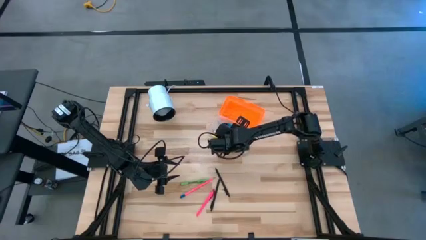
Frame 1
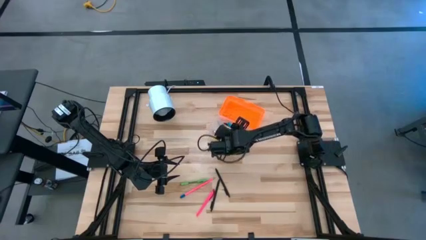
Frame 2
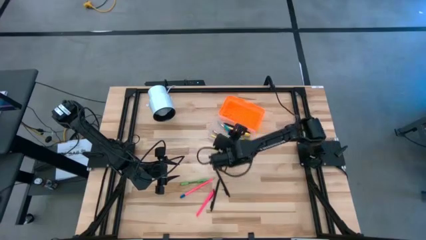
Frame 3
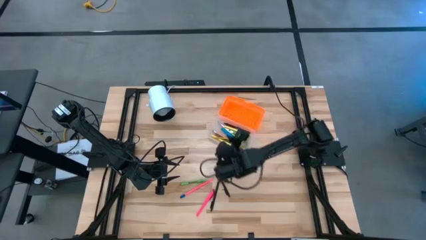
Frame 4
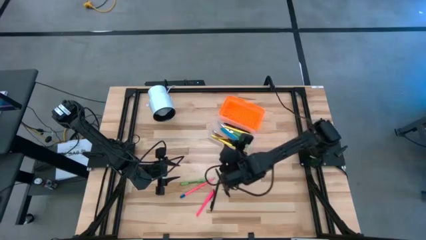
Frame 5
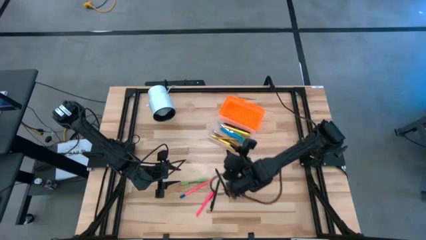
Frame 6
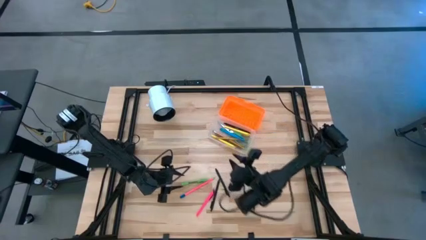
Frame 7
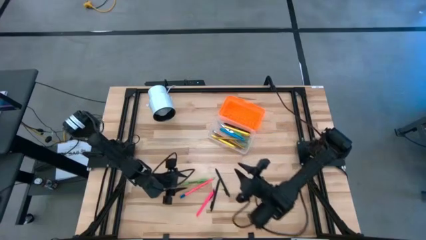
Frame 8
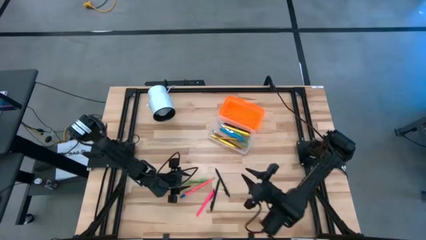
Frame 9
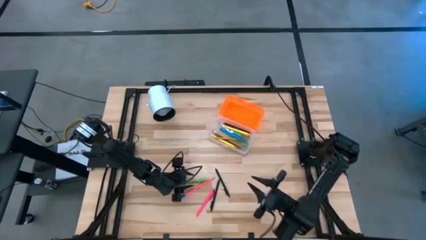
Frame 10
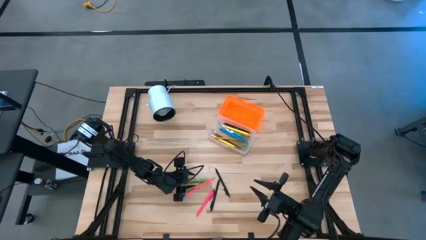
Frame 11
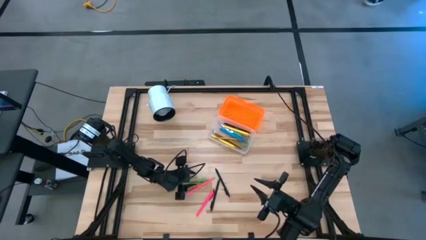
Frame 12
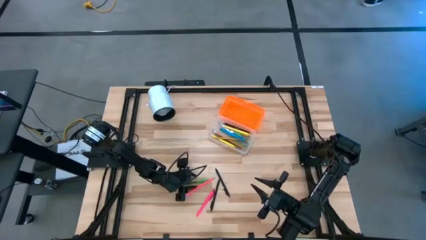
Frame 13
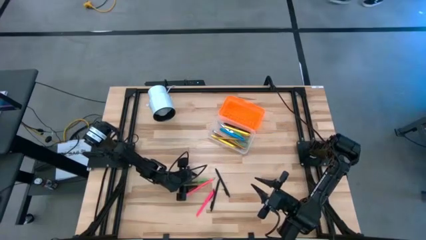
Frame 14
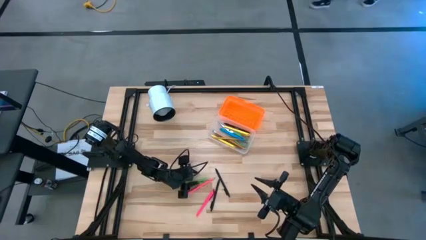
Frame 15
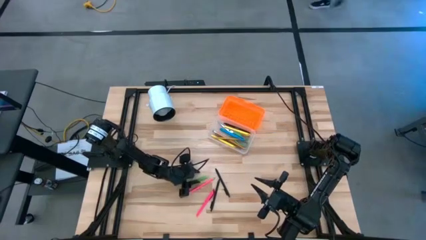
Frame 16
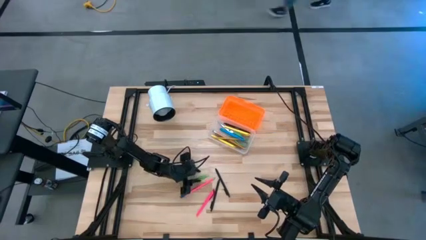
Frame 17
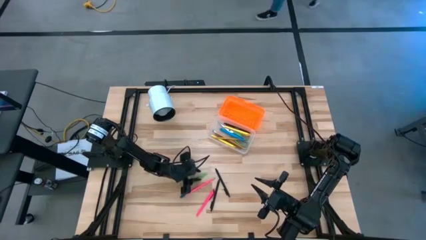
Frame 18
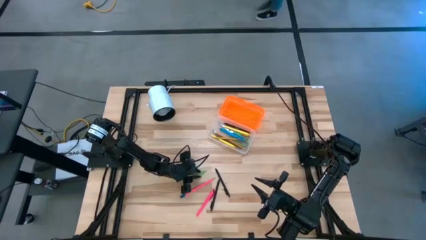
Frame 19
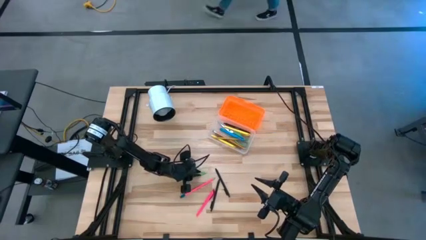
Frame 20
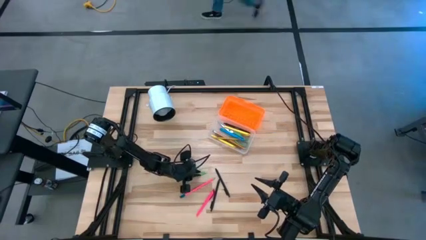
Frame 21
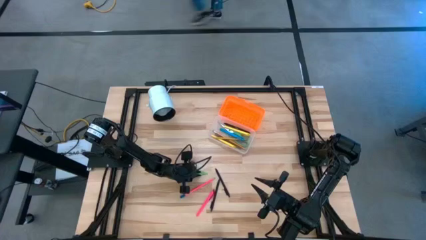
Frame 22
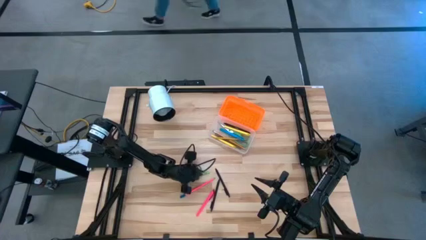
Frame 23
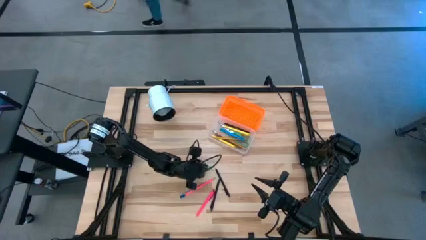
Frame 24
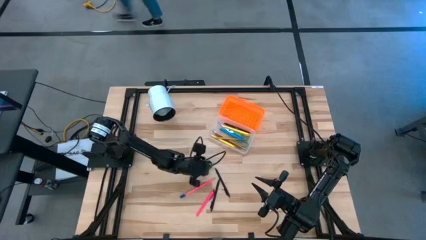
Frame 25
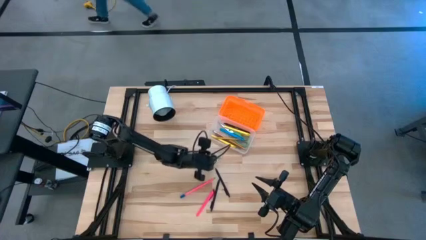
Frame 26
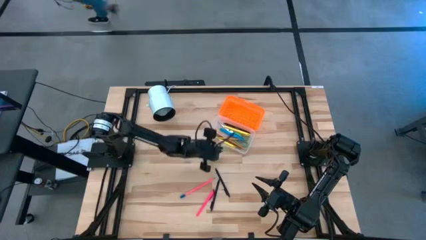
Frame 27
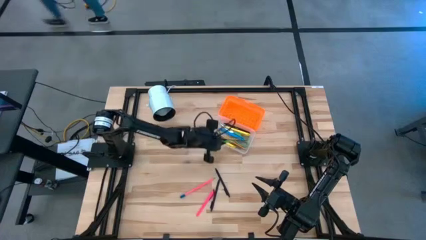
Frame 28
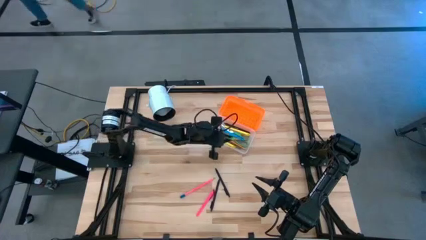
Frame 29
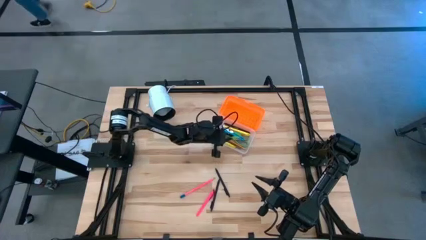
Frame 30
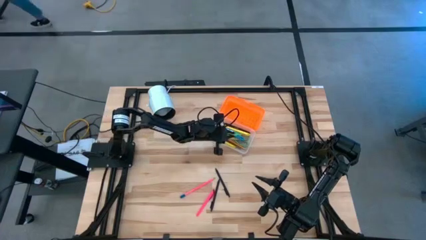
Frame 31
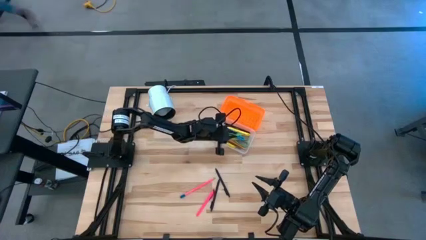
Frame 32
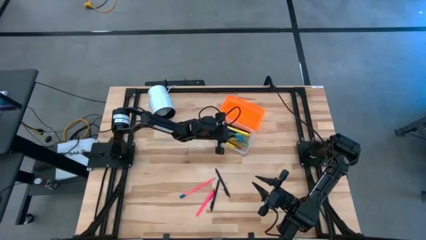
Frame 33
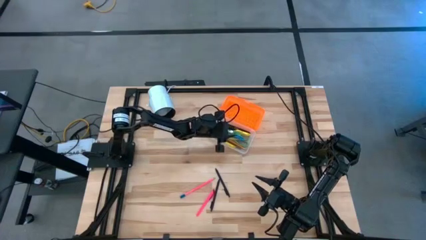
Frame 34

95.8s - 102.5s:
Task: Pick & place school supplies into a supply box
Put the green pen into the supply box

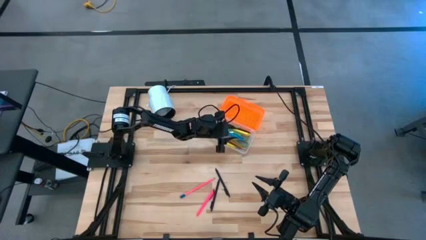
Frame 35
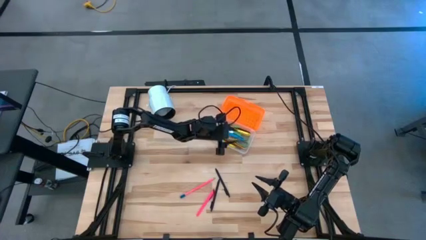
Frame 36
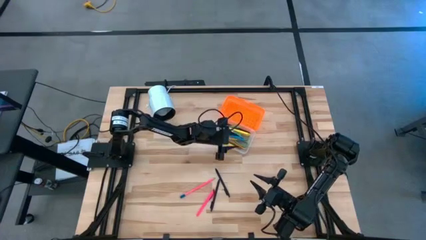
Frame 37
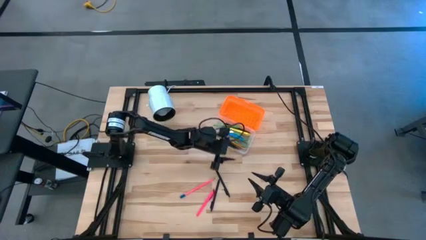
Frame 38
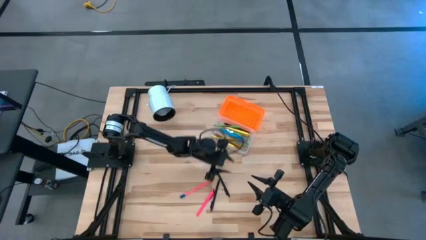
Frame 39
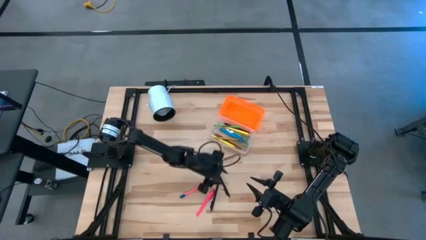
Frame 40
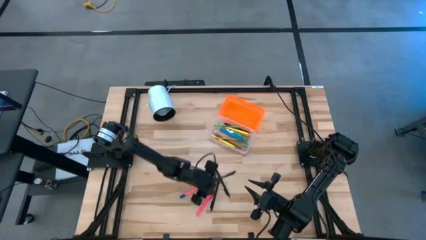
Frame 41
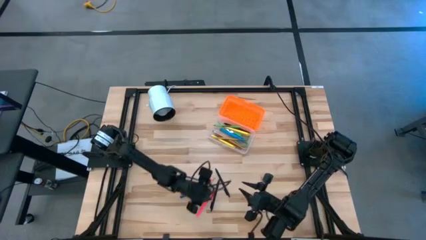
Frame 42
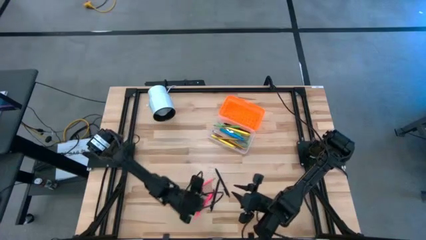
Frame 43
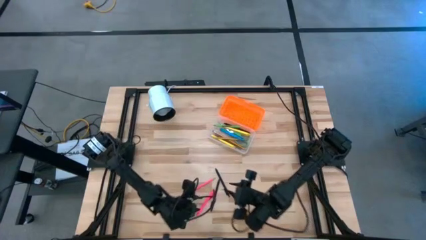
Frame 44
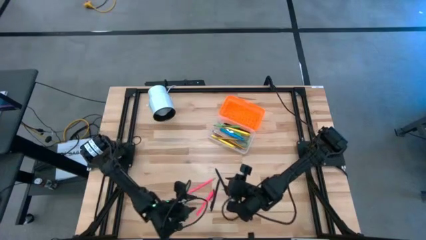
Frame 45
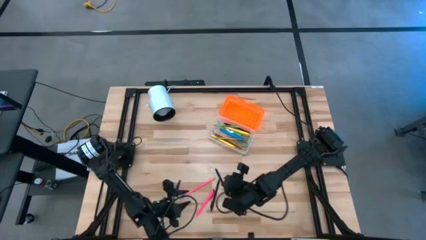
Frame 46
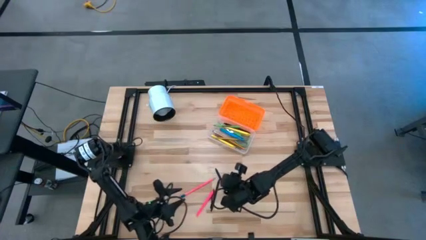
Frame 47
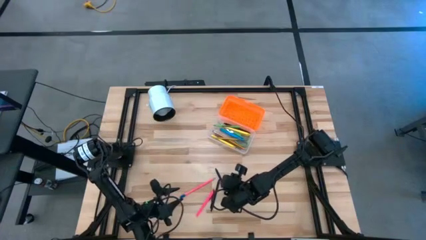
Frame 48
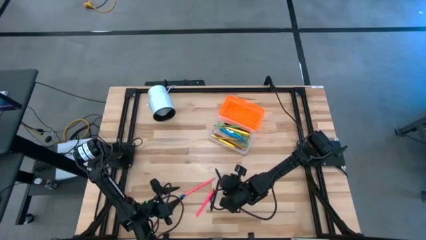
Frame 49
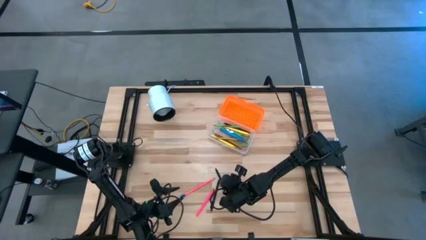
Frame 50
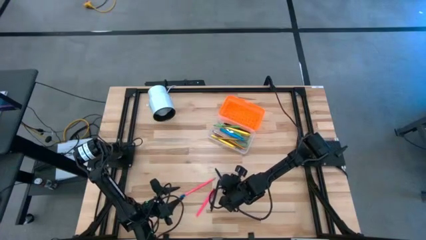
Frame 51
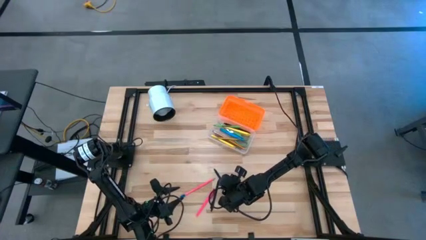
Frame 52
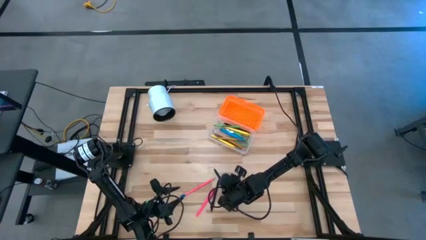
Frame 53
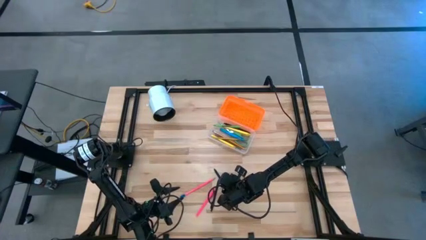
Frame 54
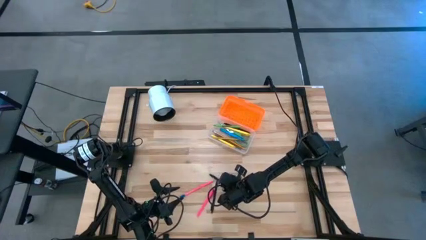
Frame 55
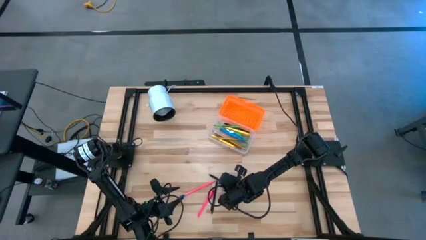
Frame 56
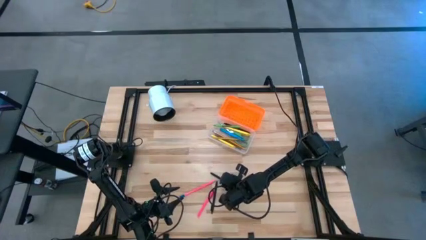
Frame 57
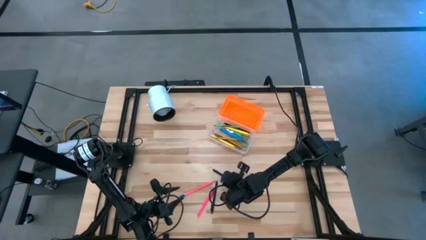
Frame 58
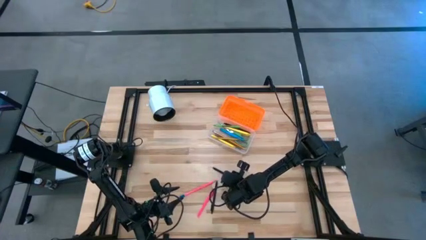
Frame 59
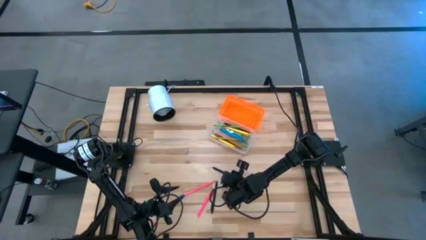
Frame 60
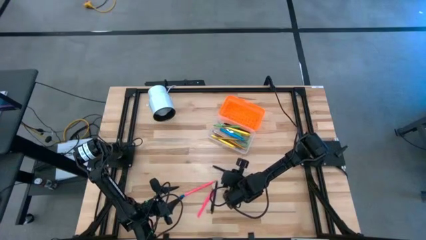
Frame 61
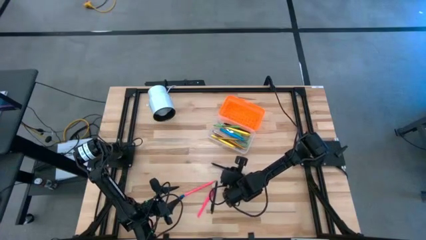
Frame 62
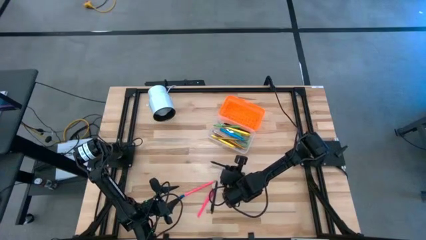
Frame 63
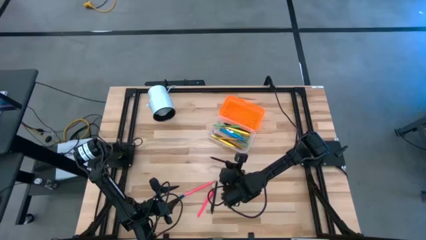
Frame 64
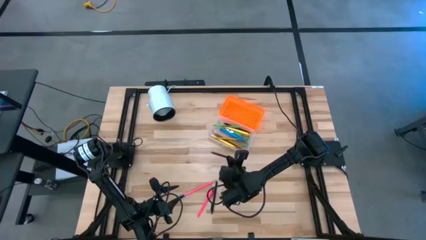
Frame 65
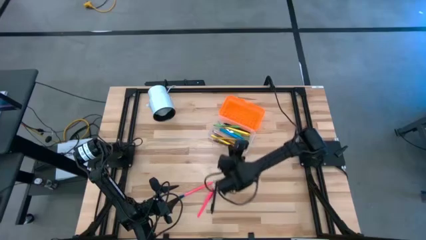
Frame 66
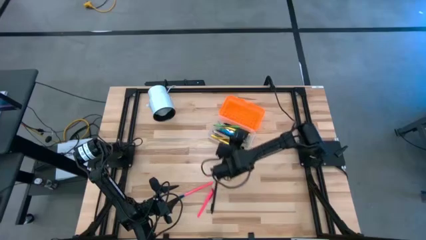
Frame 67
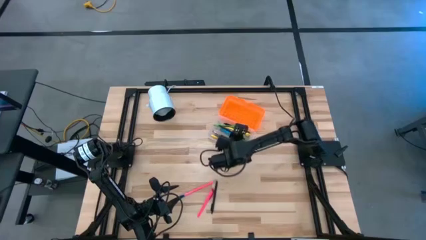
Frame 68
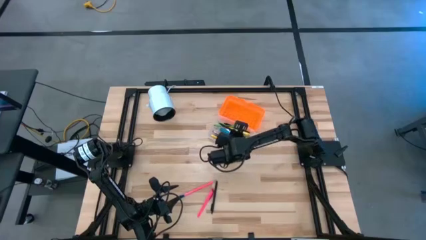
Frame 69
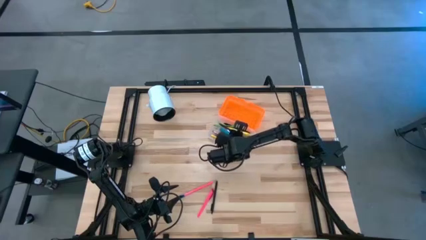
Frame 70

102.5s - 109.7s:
Put the right black pen into the supply box
